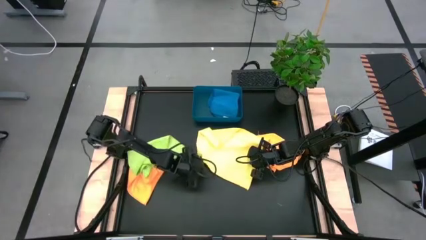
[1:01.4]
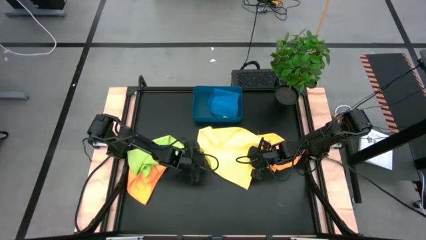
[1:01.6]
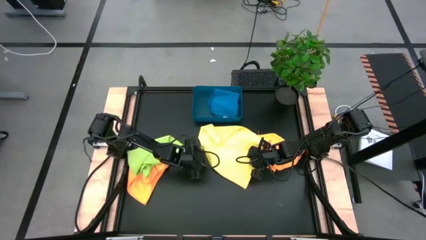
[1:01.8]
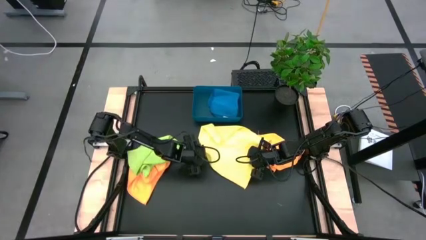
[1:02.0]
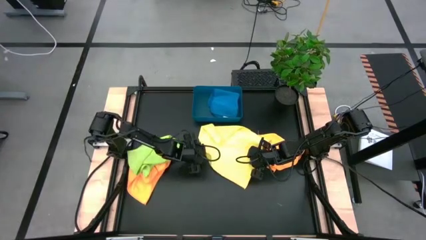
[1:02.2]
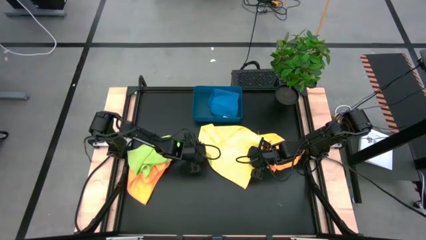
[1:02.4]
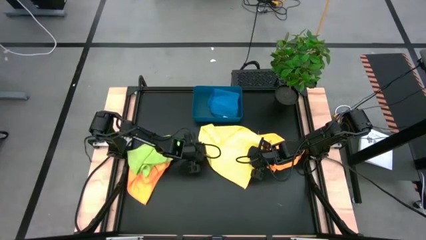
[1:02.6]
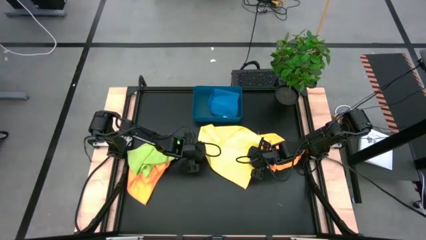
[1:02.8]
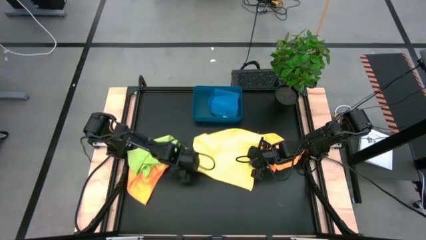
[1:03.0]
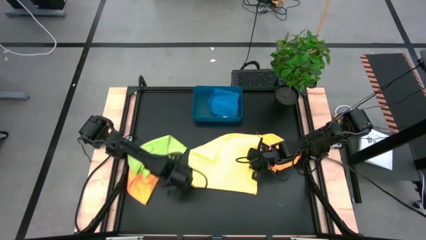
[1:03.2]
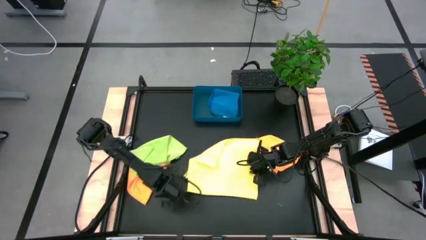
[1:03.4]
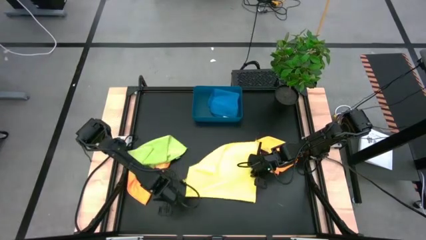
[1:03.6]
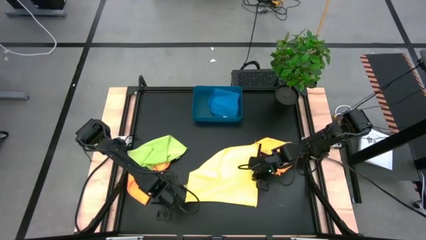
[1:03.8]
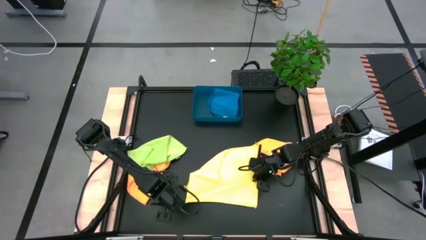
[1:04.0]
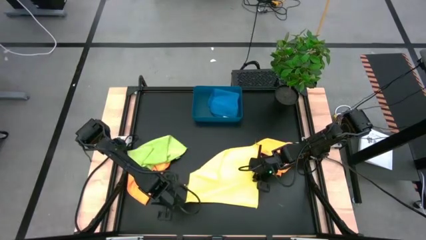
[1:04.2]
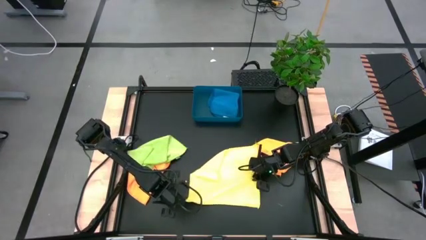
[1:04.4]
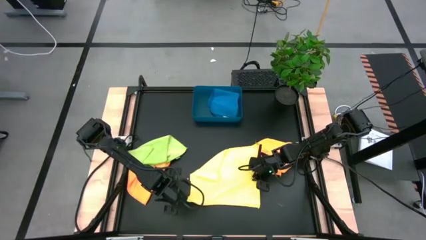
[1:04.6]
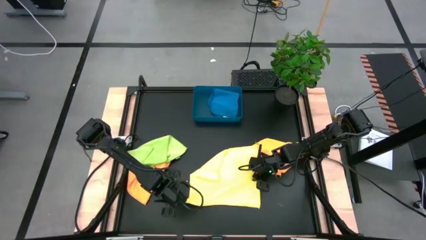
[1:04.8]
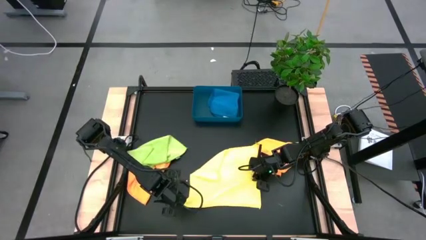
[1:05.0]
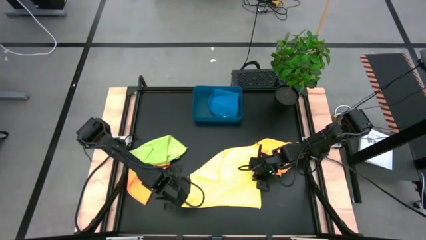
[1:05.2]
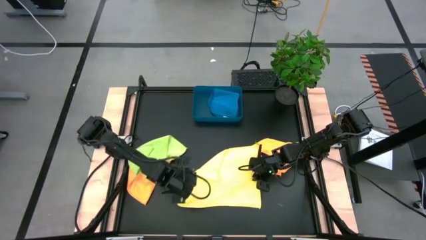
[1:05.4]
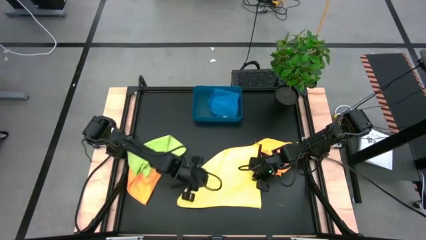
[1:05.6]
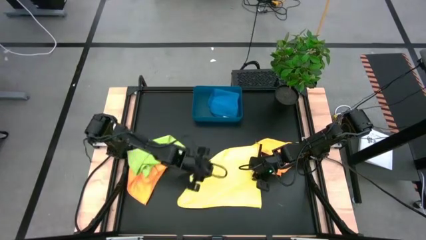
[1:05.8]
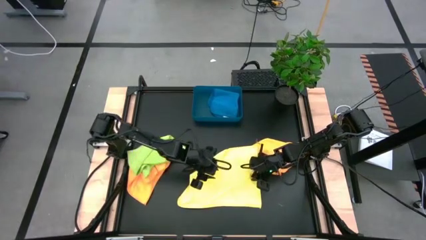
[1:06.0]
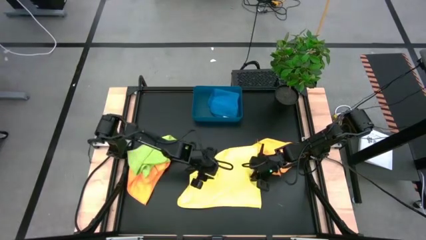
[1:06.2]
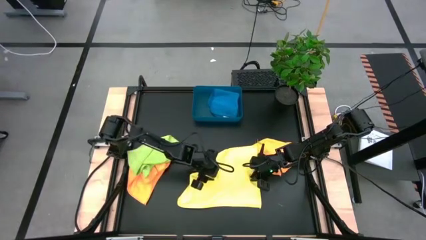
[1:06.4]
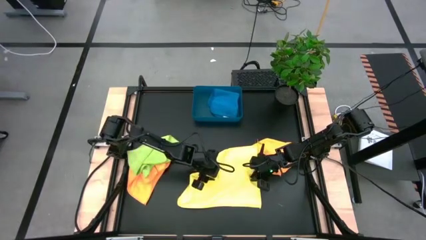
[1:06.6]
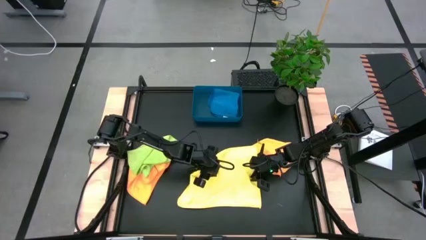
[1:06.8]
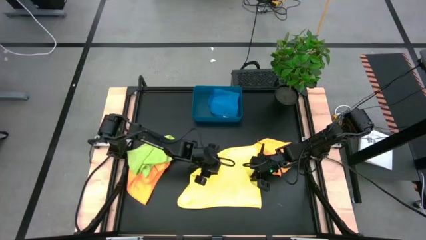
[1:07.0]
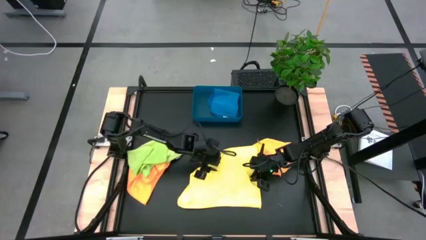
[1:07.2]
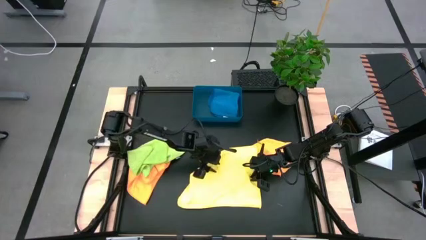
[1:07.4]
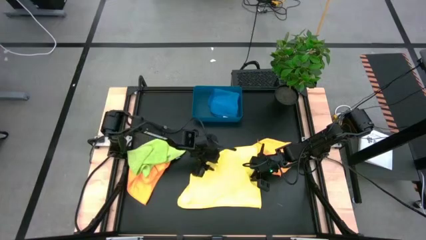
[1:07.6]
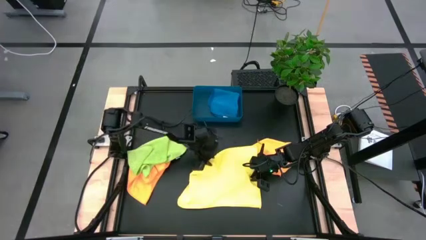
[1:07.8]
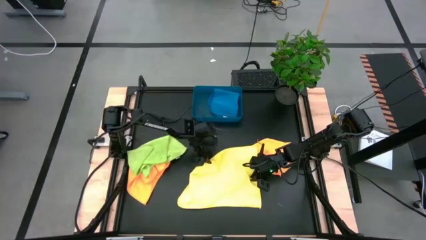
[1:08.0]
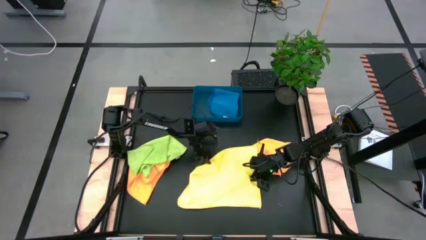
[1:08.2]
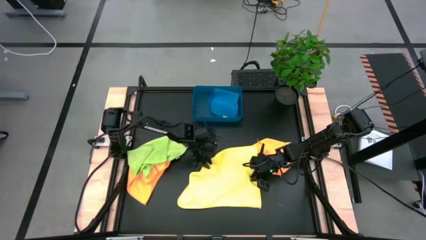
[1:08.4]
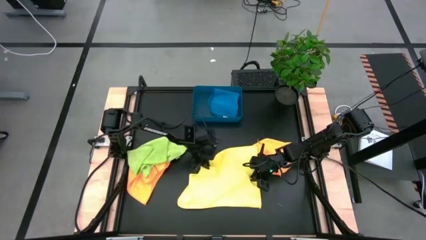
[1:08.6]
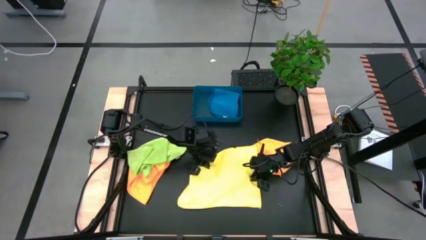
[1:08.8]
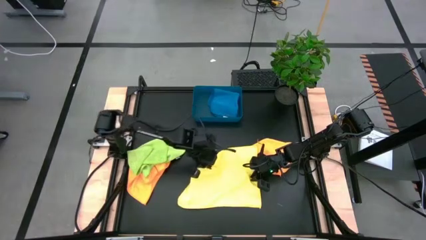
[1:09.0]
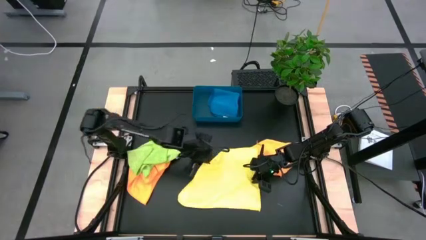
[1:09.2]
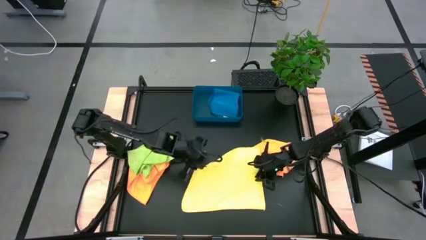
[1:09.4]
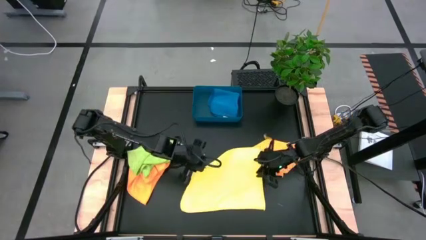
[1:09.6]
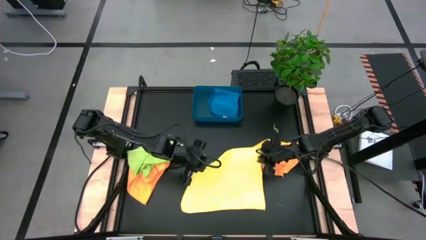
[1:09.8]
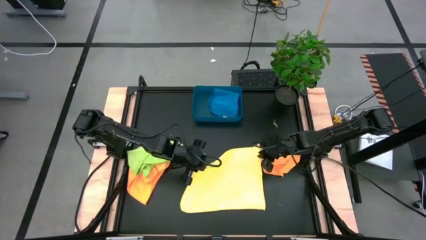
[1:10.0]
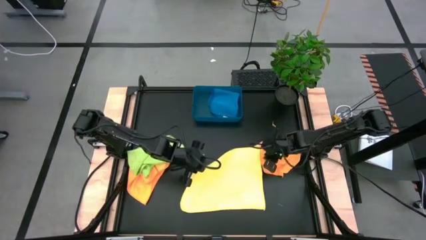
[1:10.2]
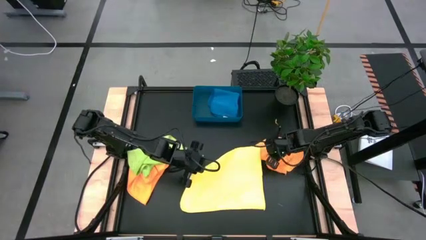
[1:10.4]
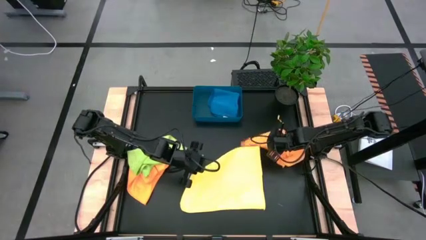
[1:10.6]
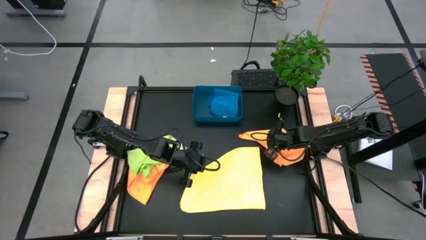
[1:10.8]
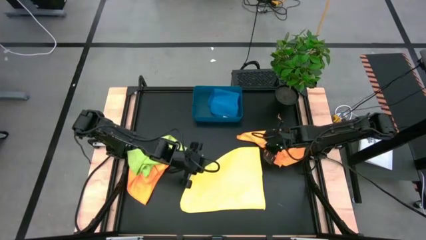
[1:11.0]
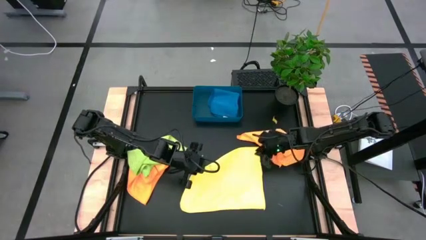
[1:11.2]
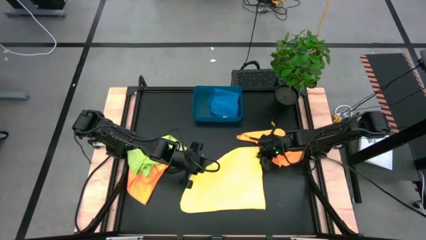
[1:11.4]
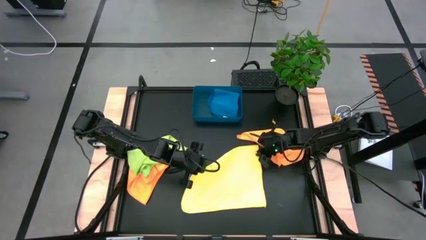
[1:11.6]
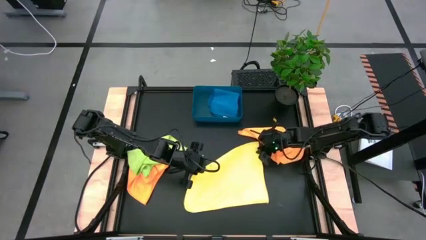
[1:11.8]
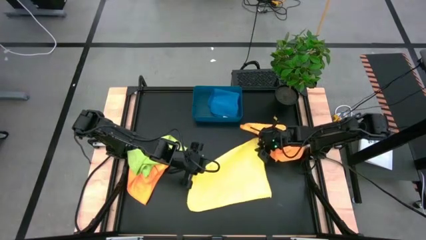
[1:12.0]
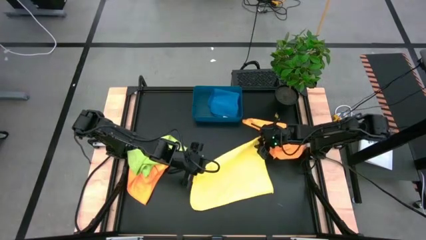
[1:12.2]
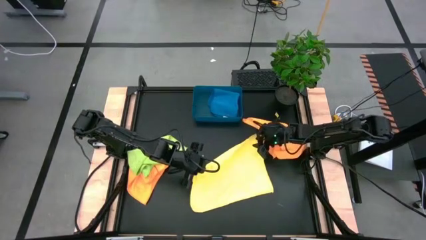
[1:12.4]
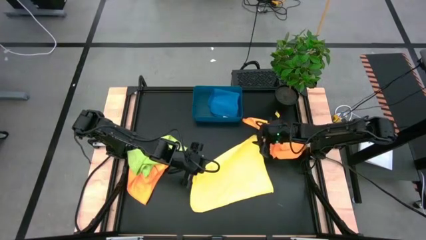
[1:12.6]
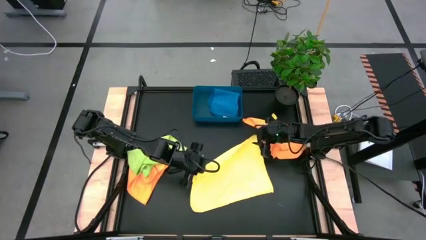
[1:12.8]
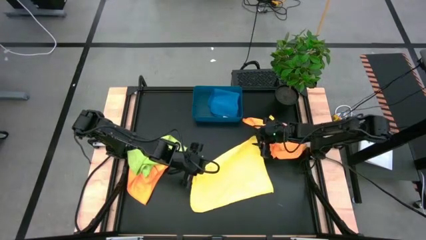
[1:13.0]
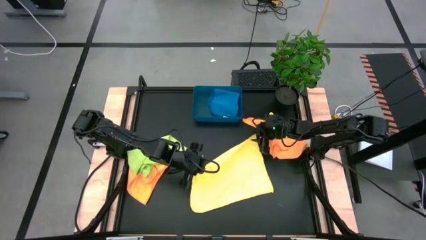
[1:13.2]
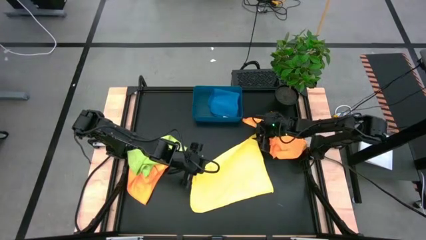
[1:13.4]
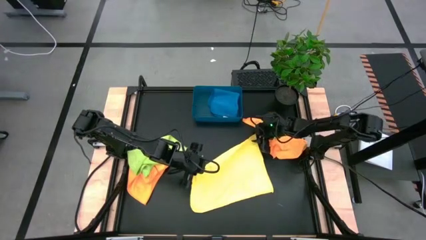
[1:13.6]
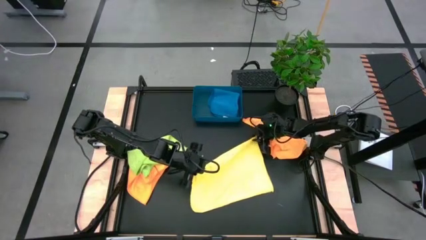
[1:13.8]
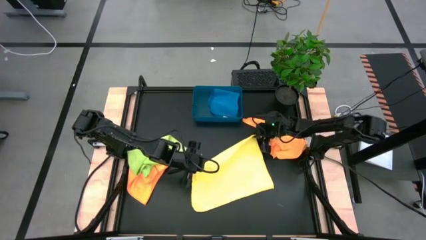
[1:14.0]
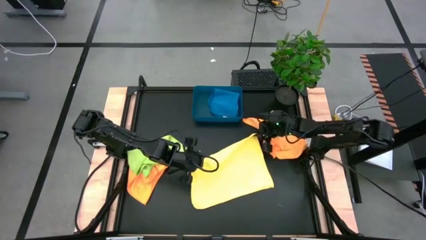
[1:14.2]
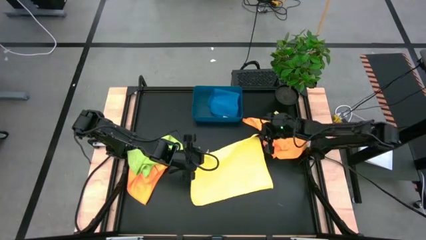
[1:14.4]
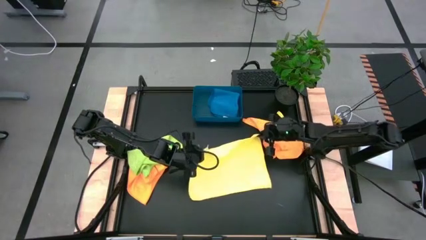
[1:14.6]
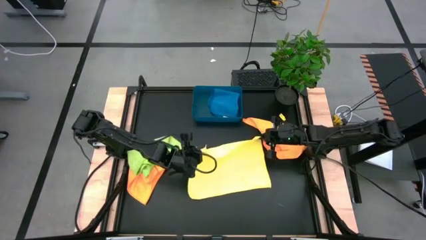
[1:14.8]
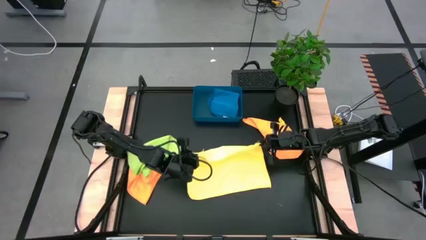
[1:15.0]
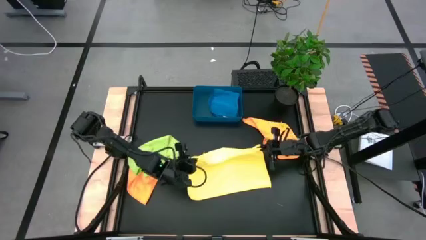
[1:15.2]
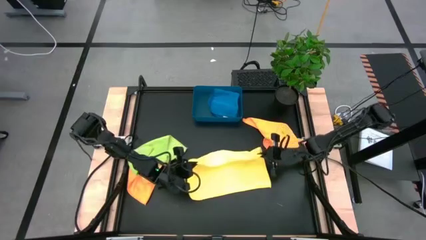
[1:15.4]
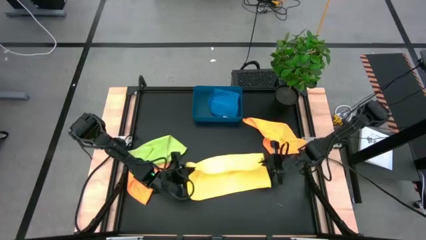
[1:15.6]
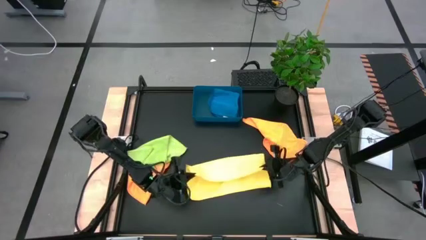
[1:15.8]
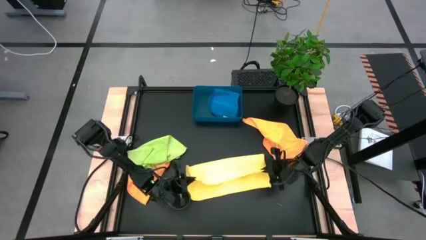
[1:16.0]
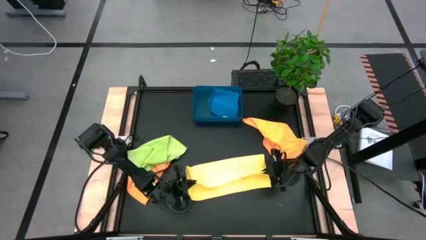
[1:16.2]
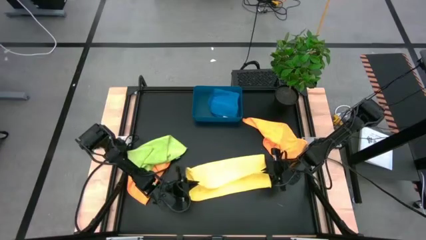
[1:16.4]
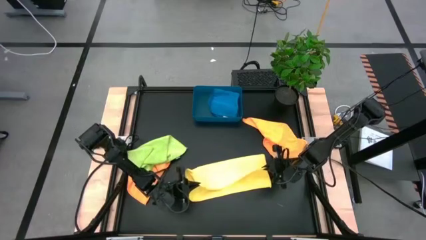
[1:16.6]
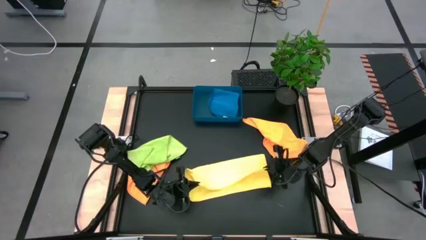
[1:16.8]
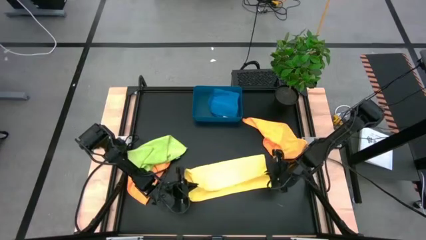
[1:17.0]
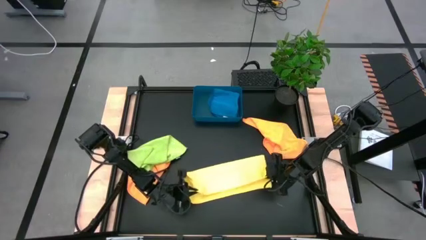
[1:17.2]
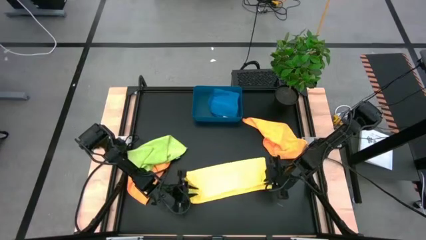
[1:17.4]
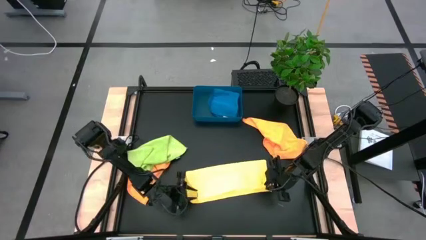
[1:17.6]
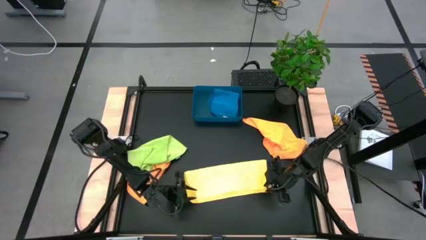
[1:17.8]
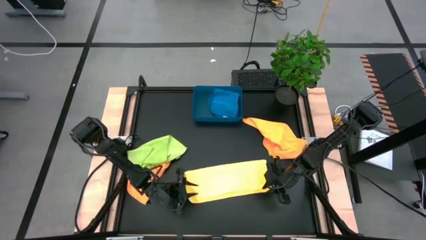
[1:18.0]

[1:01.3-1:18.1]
Task: Fold microfiber towels
Fold the yellow microfiber cloth
